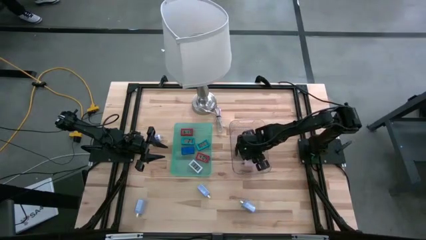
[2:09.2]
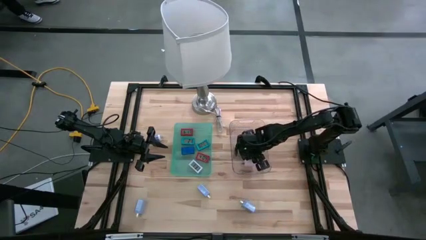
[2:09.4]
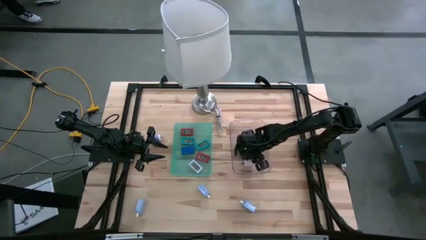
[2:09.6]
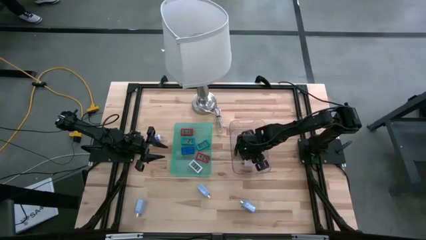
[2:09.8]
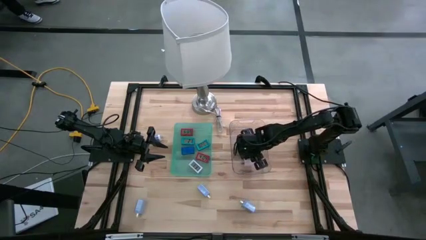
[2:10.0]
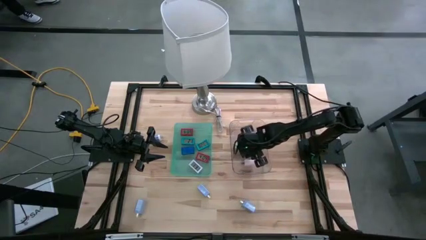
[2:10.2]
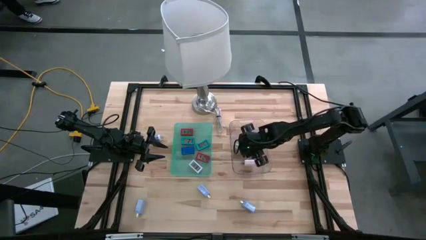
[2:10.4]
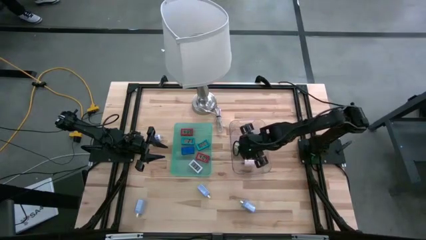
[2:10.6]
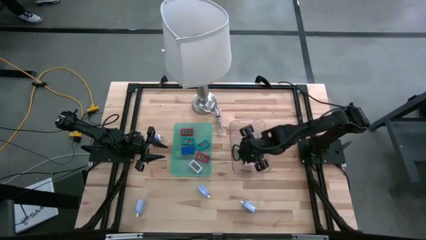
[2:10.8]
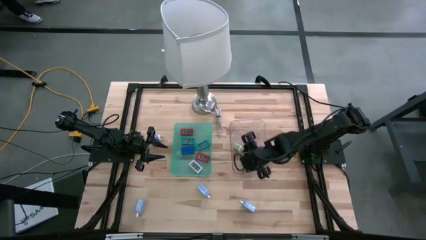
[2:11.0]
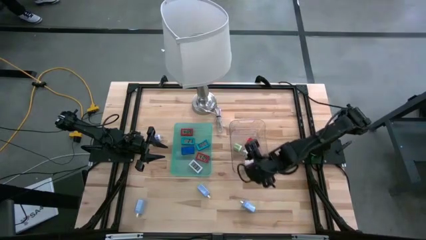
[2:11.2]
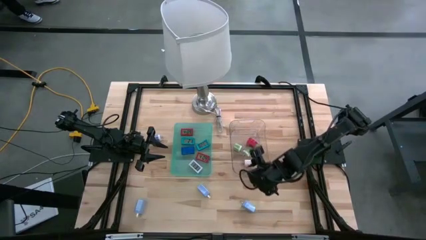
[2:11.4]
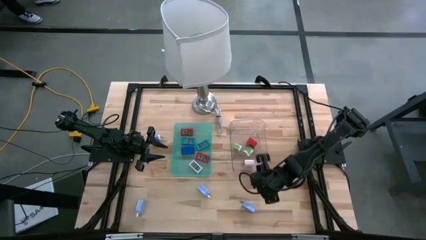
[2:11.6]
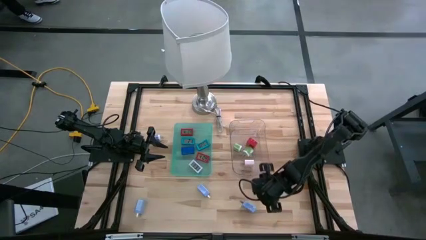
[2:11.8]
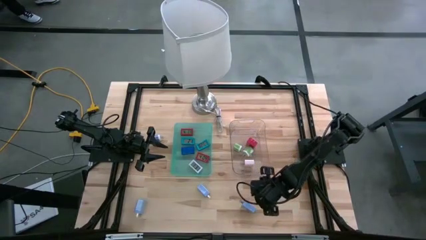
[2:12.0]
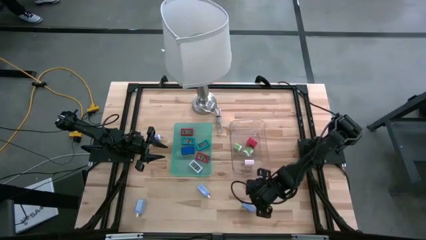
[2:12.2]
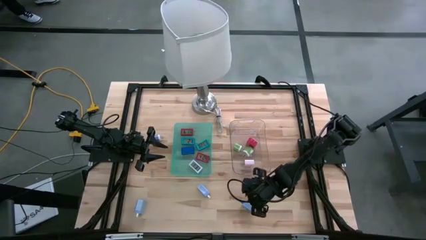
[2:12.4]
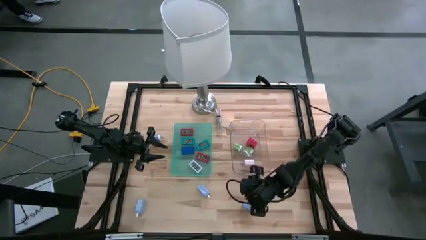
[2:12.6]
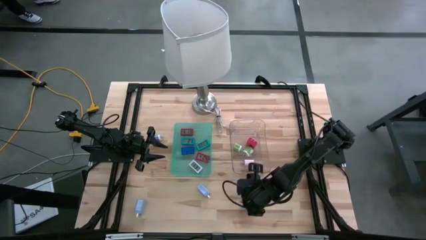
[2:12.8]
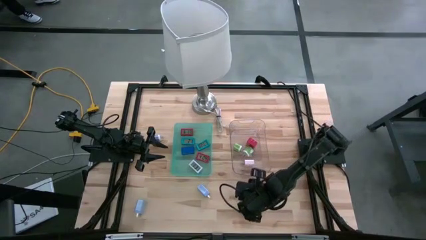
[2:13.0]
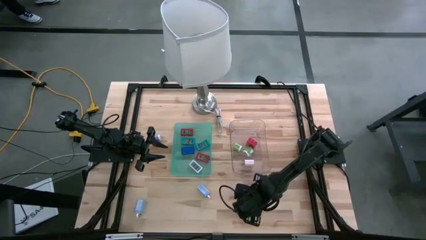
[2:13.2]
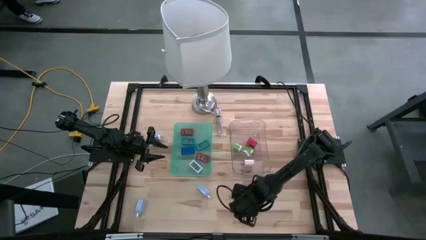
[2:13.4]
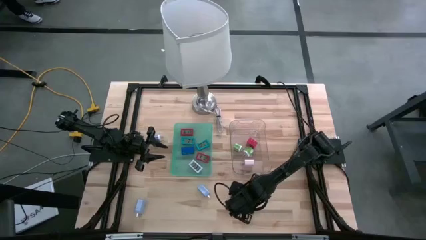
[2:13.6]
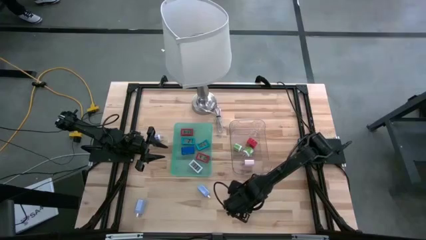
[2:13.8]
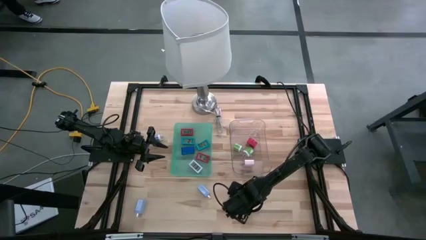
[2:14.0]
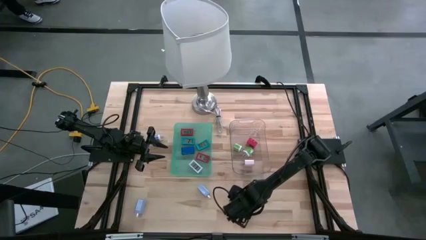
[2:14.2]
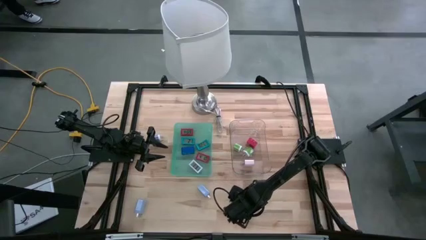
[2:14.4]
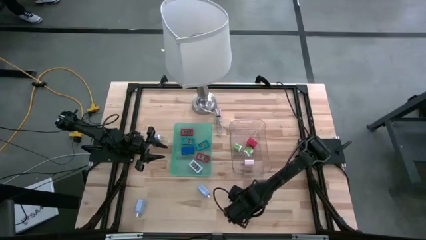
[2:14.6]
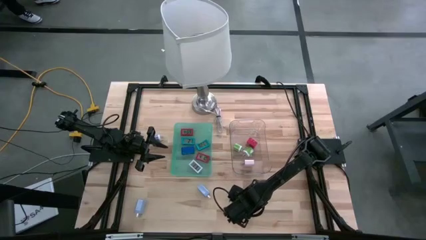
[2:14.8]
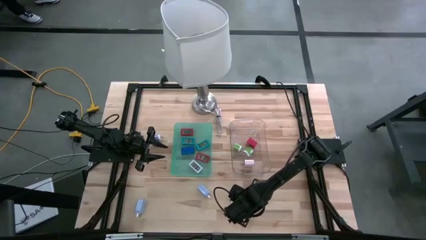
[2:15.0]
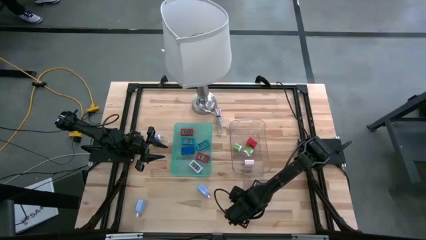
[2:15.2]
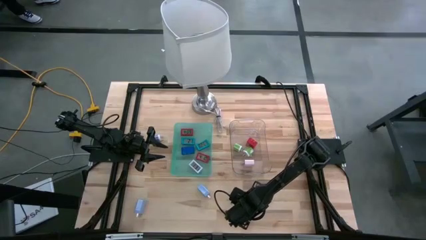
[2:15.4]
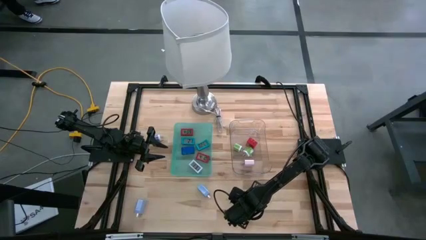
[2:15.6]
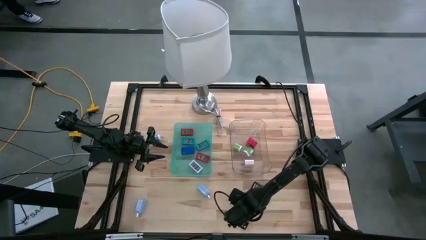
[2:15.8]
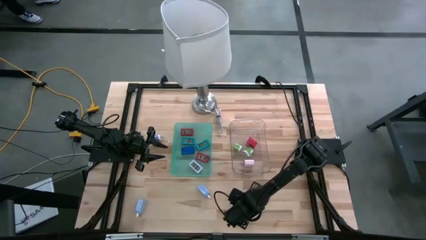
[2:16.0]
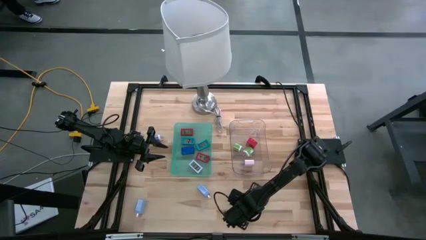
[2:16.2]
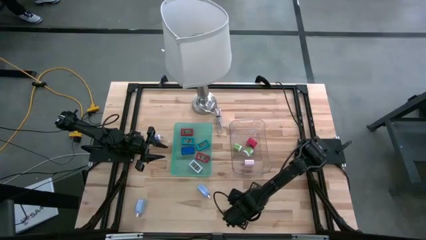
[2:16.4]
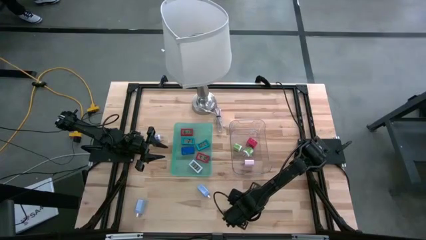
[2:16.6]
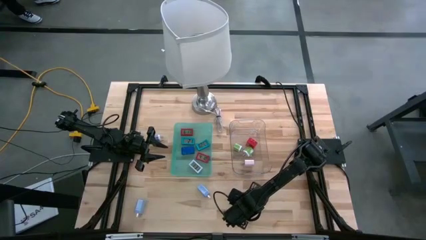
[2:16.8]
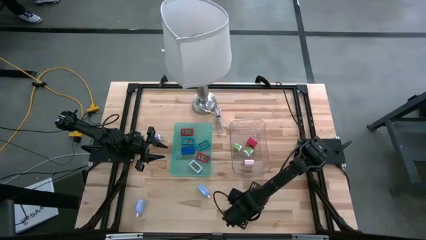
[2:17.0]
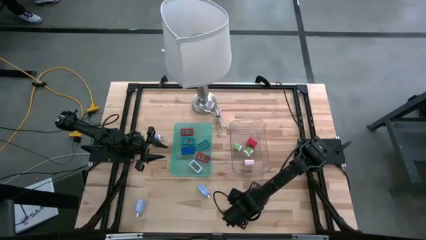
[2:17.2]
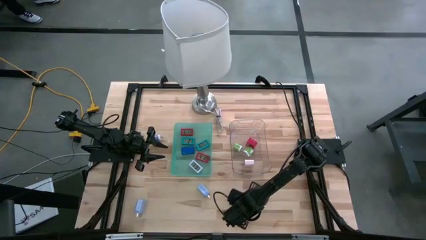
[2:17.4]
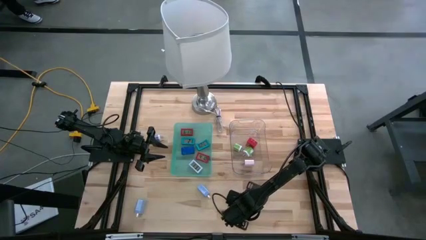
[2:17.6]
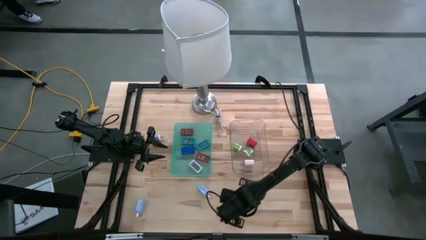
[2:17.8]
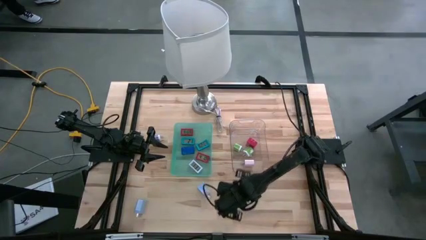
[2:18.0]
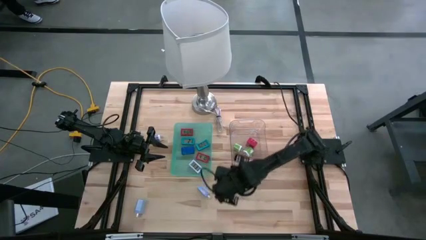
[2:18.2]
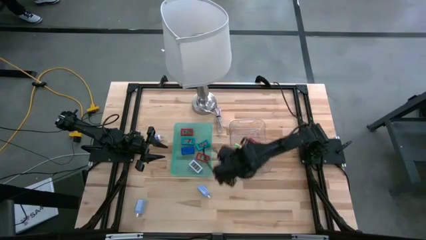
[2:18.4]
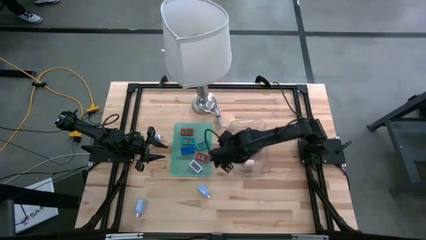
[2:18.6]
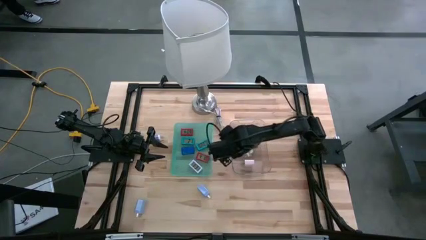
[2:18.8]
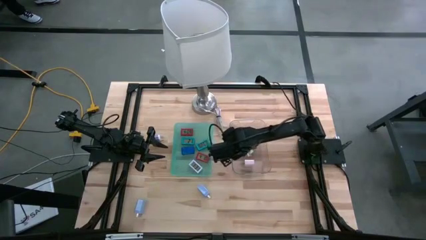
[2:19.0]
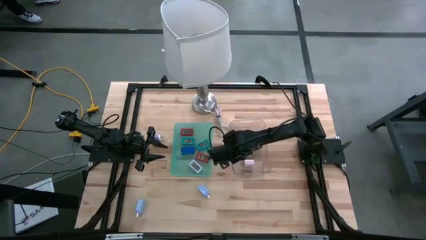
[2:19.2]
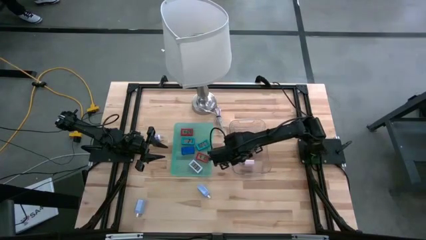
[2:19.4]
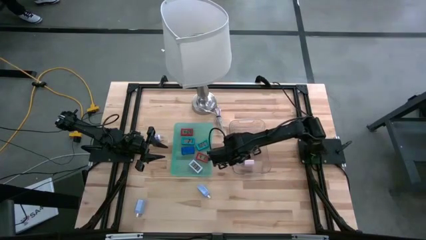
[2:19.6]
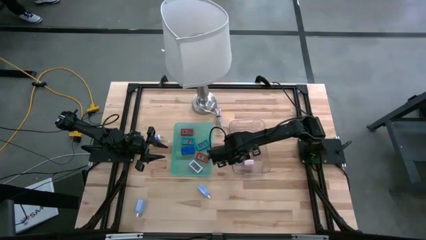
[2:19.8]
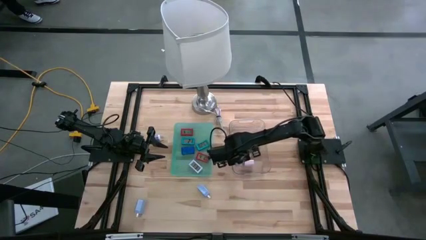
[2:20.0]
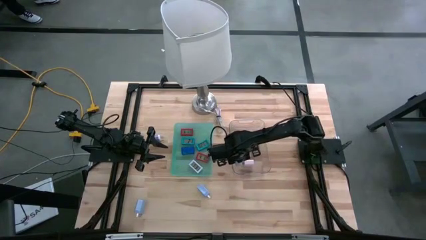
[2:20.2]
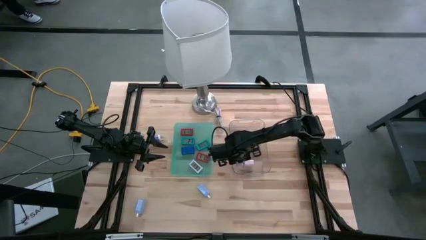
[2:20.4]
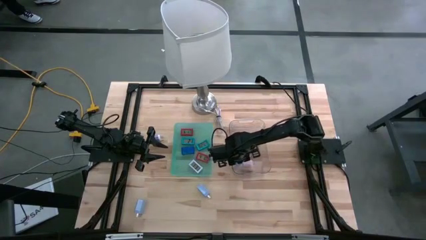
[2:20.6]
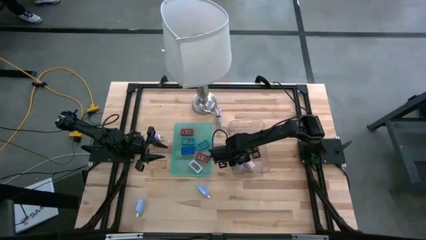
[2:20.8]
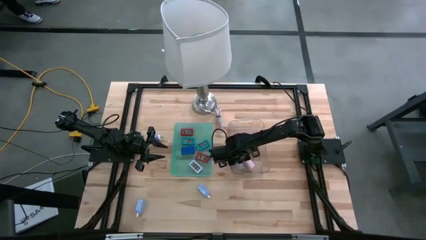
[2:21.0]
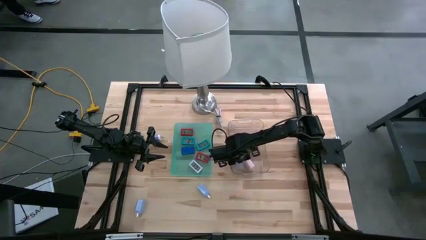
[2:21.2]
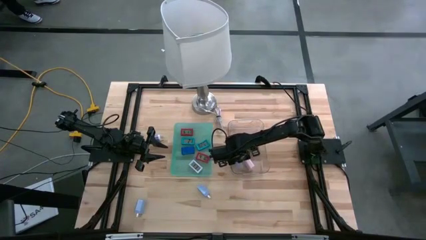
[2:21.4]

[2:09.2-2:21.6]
Task: Pick & Place Office items
Put the right violet charger adapter into the transparent bin

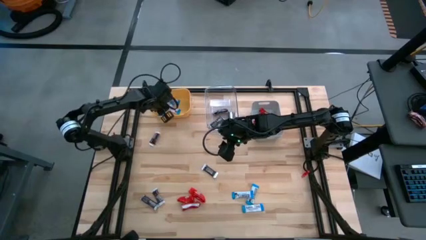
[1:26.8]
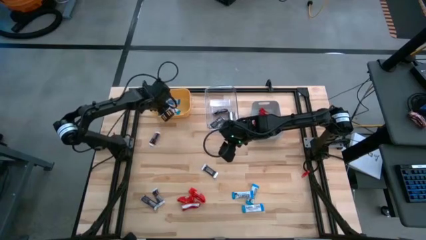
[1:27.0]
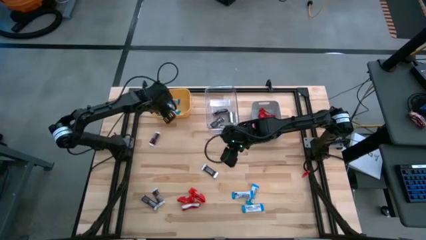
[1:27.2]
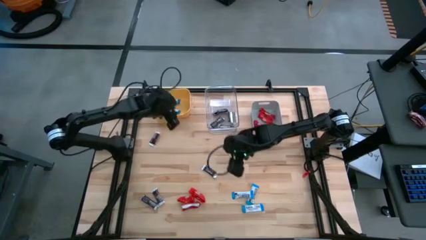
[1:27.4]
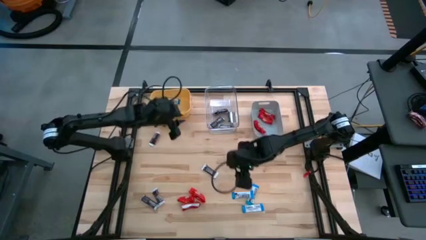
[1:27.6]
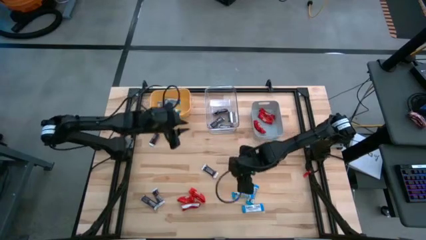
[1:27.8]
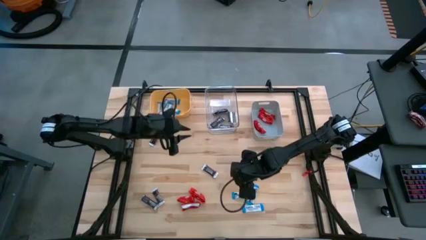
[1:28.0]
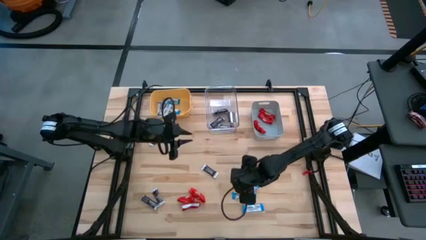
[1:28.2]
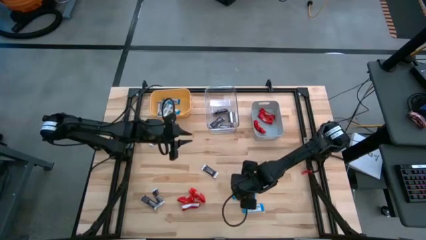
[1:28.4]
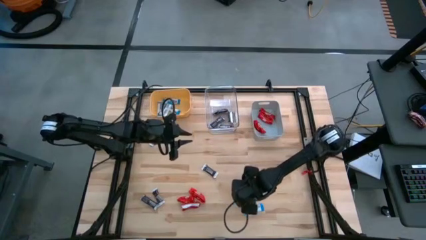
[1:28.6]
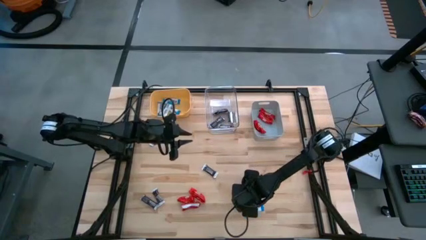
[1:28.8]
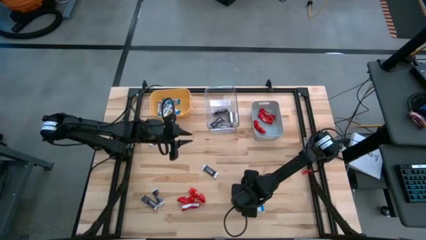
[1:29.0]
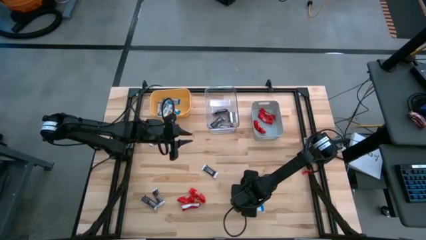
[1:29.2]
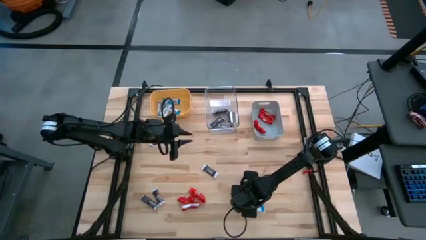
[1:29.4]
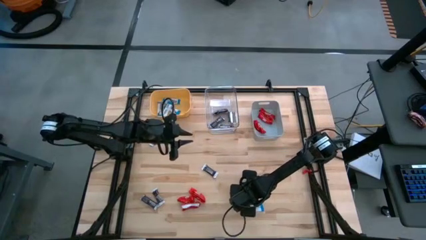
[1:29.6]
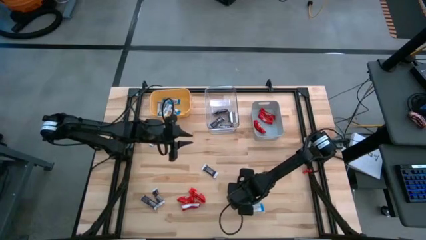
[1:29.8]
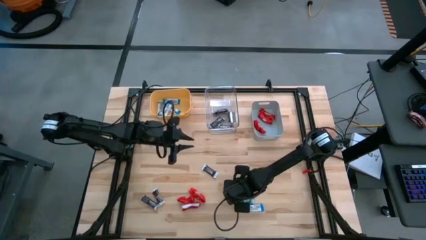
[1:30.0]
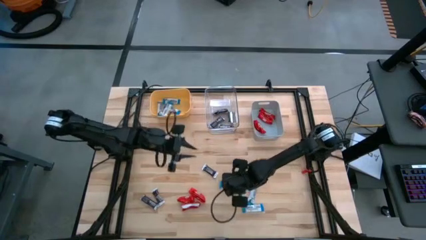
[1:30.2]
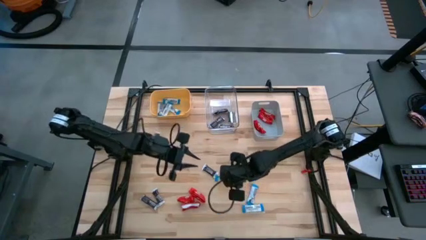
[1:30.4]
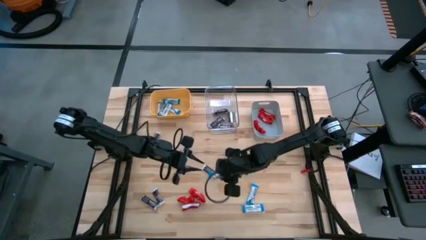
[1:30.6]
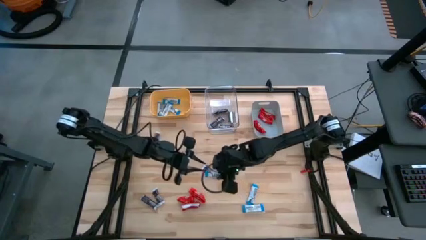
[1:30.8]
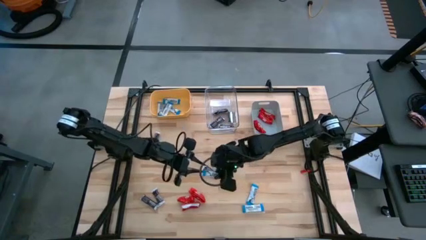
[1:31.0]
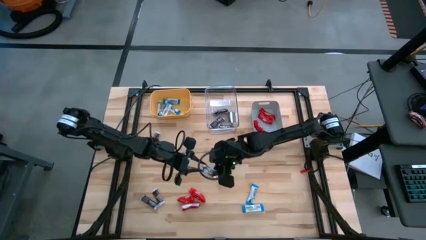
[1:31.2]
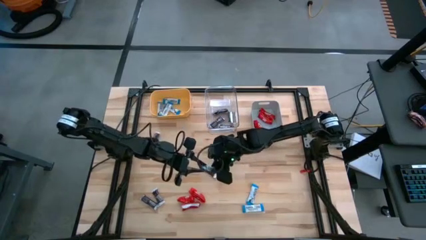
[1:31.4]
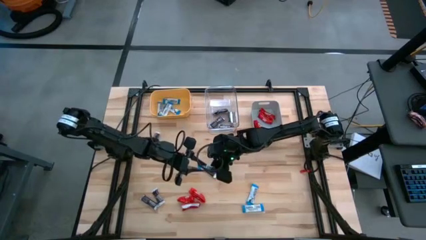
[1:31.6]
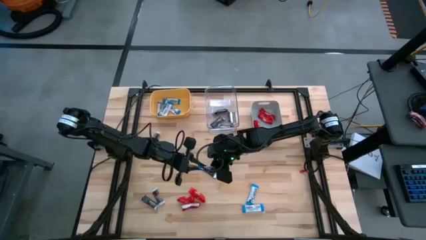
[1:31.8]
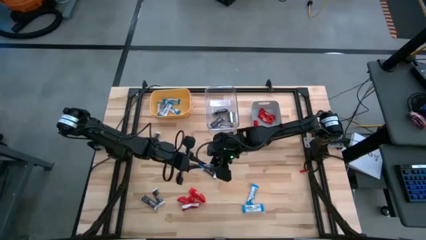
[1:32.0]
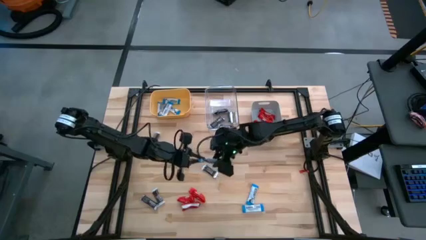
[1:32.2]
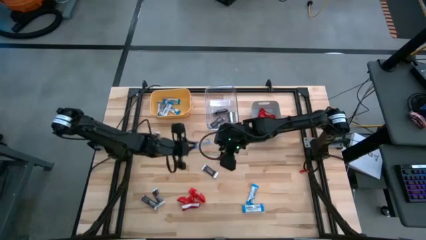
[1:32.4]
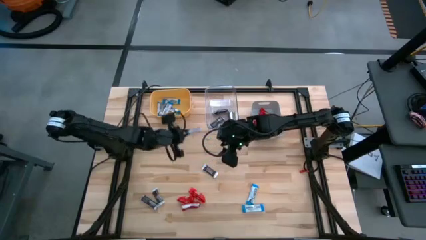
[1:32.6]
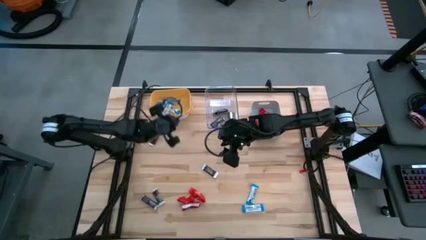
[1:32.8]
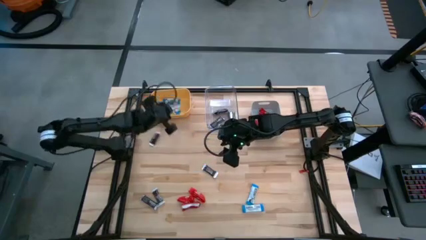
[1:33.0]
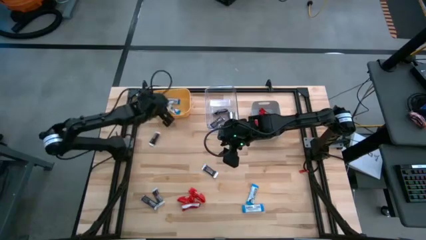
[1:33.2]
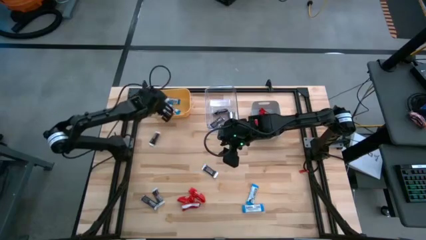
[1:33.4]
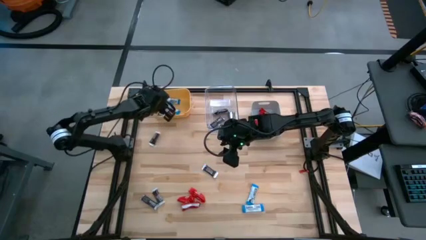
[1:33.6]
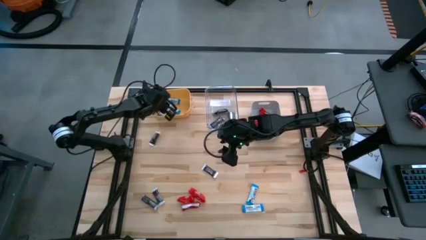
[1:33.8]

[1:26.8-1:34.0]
Task: Sort candy
Put the white chocolate into the yellow bin
